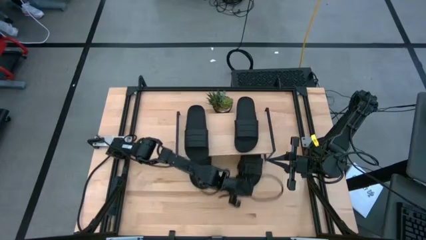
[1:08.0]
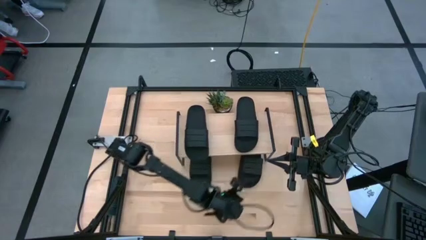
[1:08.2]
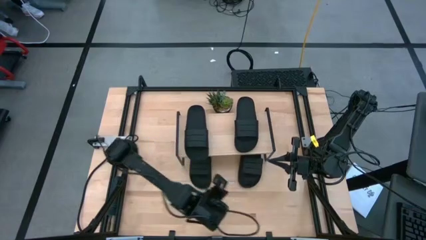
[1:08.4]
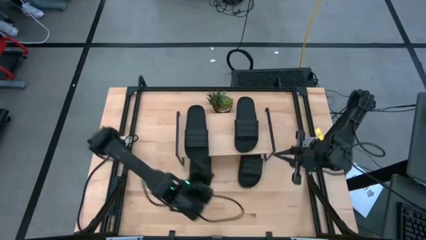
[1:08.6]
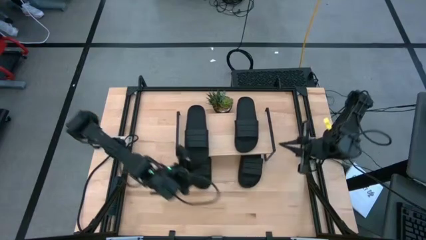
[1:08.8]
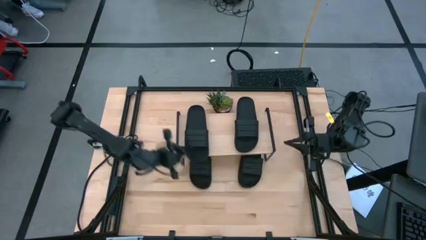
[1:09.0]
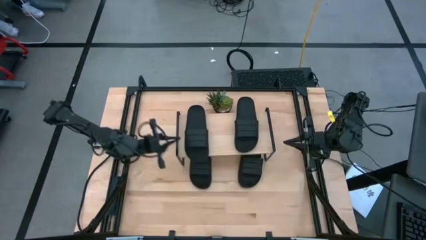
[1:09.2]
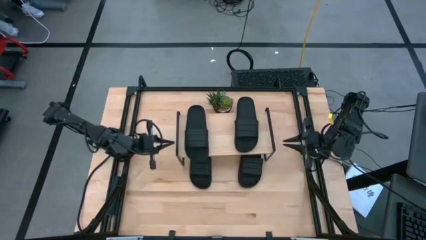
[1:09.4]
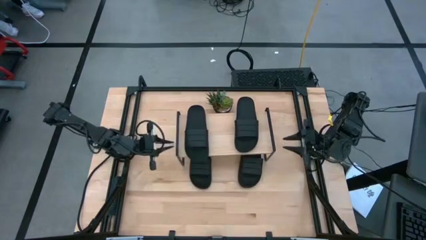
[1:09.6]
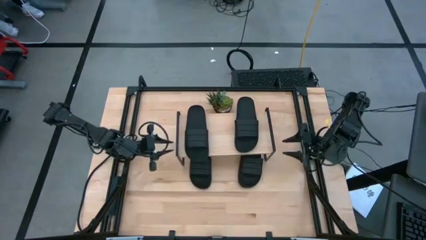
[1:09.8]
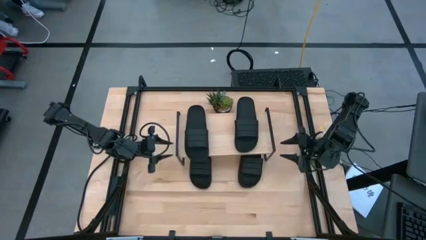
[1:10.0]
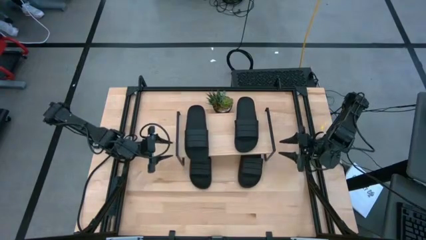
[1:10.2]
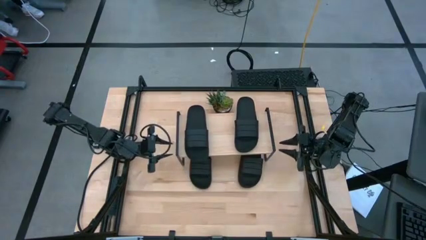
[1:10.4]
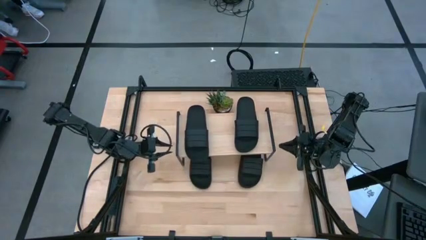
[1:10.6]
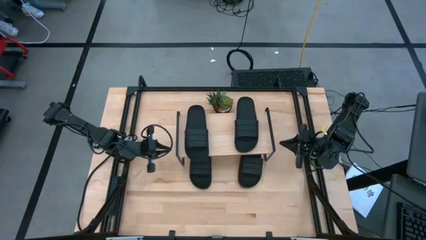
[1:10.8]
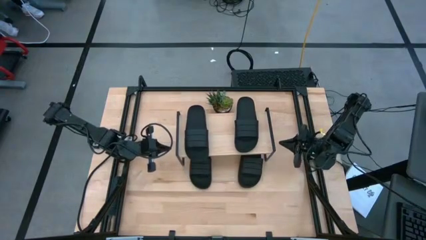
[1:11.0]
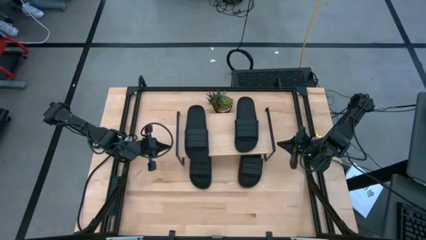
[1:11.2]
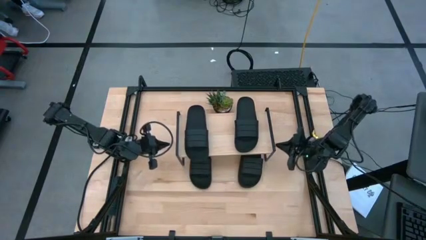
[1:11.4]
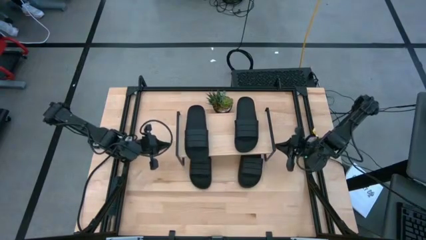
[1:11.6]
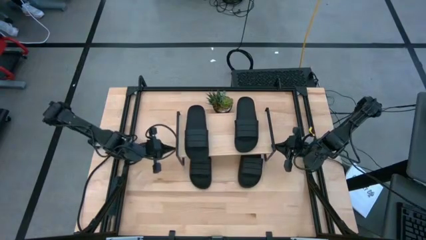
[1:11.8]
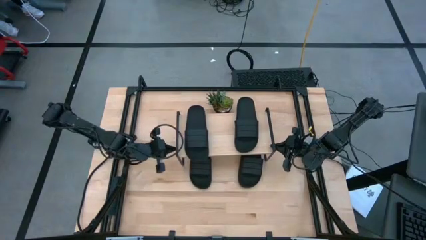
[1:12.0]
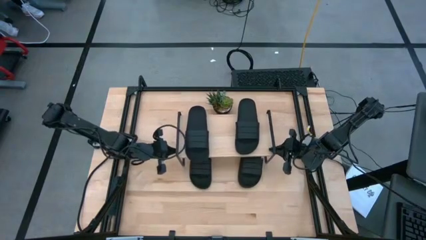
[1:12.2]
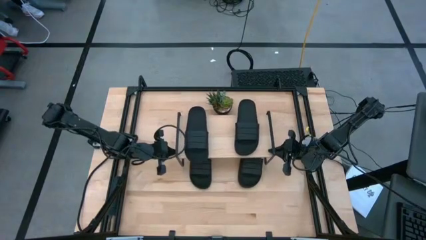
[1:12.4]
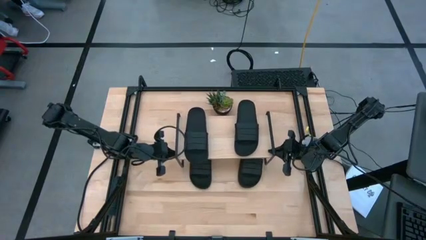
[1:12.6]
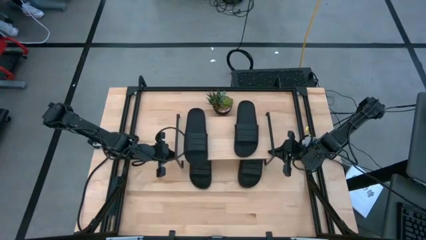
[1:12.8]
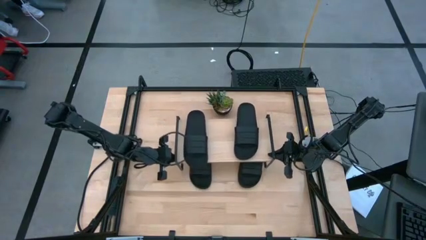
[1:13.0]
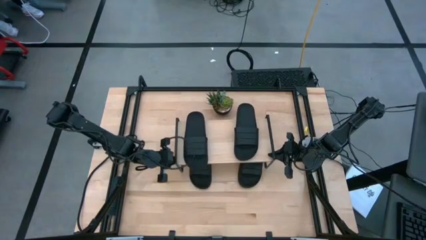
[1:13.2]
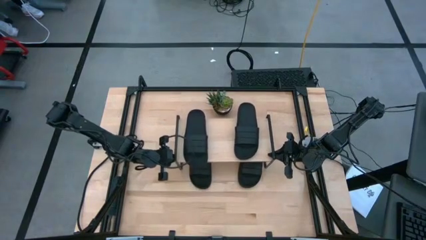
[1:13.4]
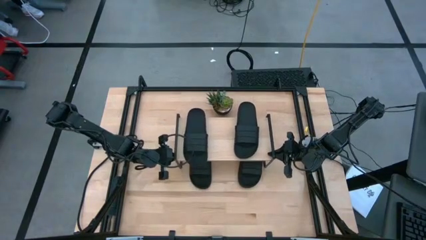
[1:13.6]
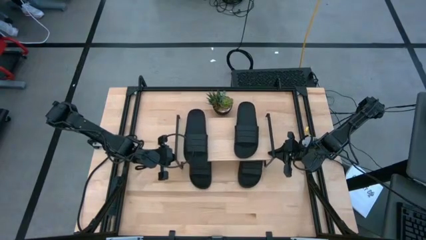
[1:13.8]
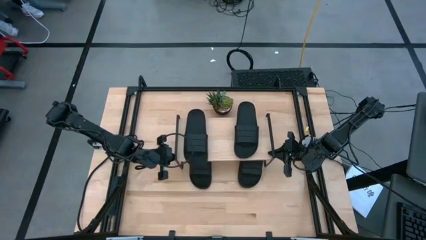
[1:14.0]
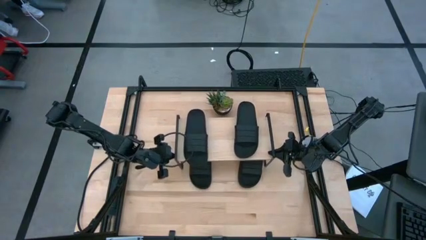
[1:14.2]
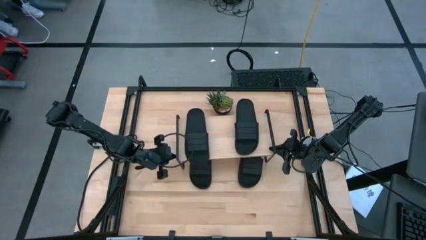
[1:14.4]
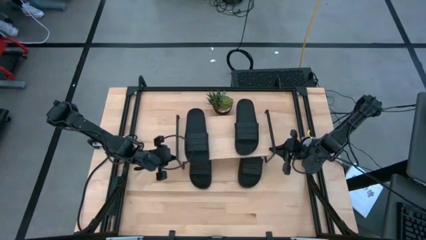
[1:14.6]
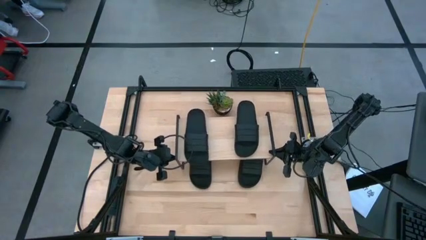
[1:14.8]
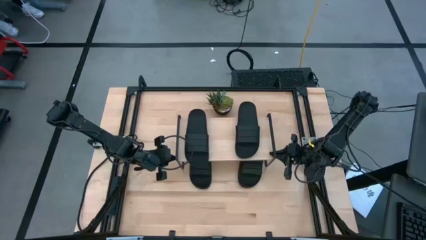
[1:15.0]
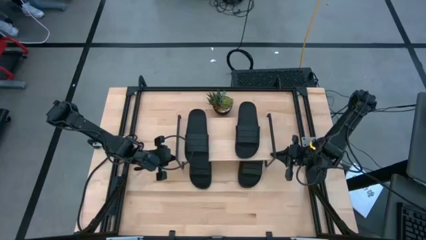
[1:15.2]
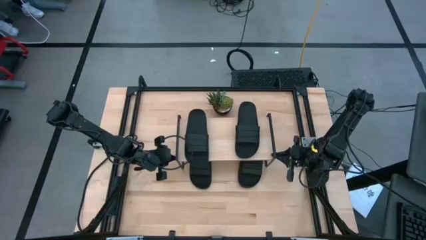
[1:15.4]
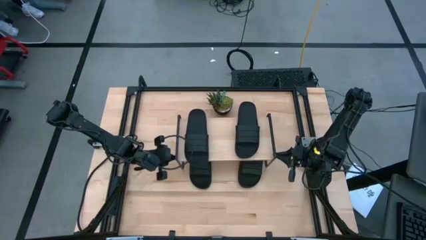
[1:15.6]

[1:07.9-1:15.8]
Task: Pick and place slides into the shelf
Adjust the shelf
